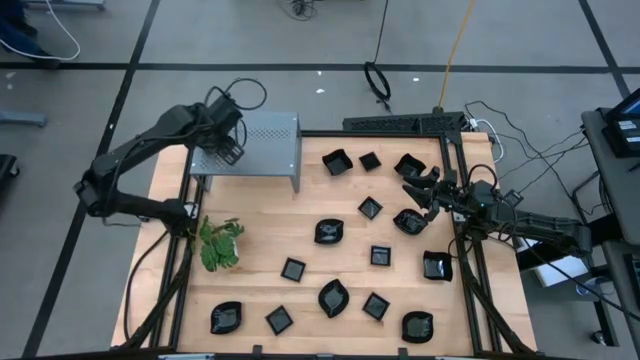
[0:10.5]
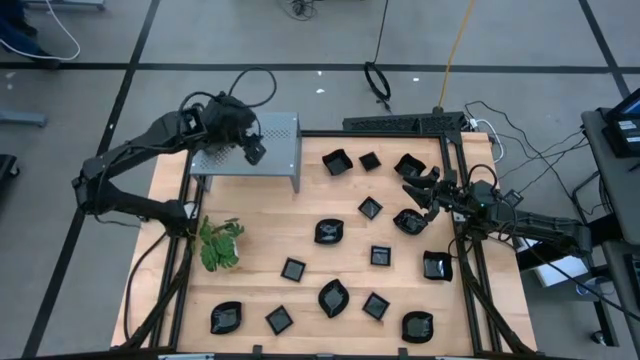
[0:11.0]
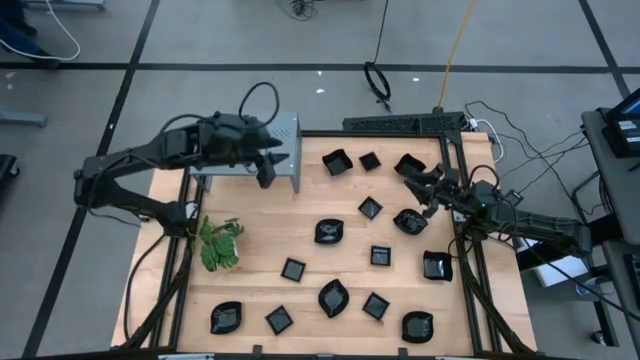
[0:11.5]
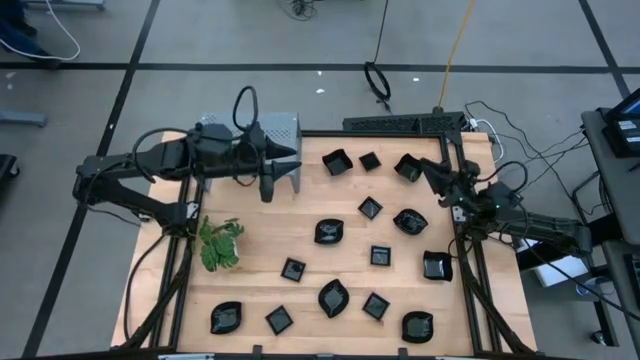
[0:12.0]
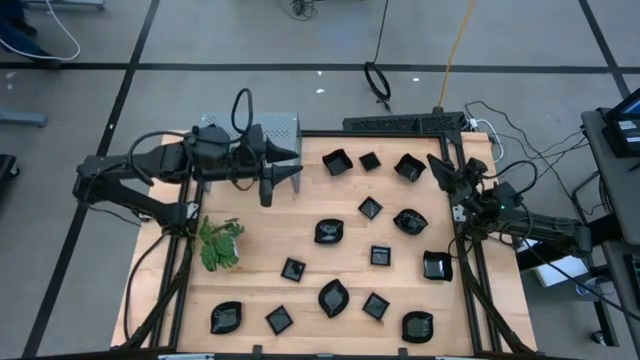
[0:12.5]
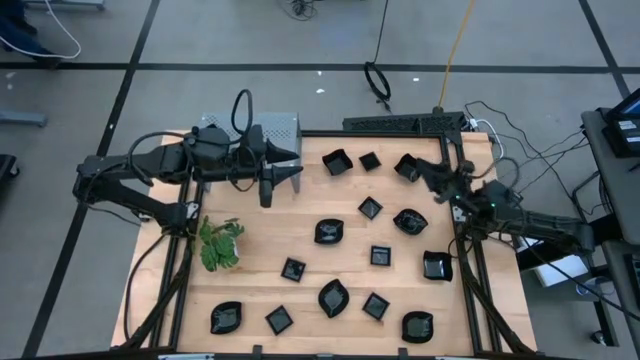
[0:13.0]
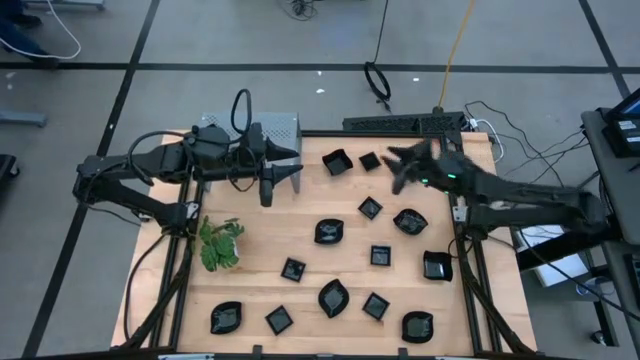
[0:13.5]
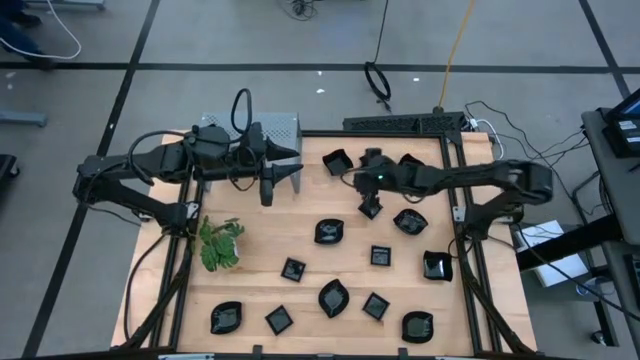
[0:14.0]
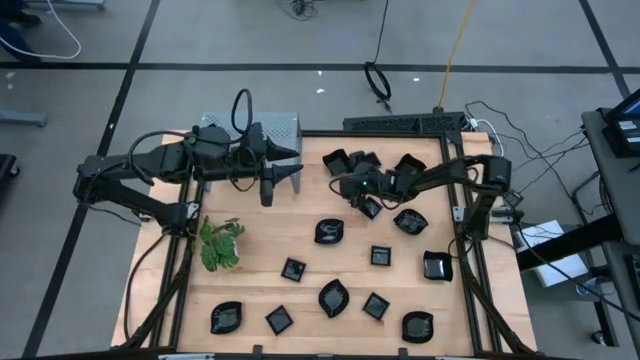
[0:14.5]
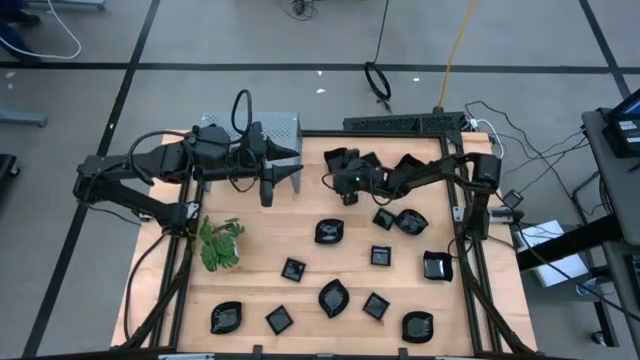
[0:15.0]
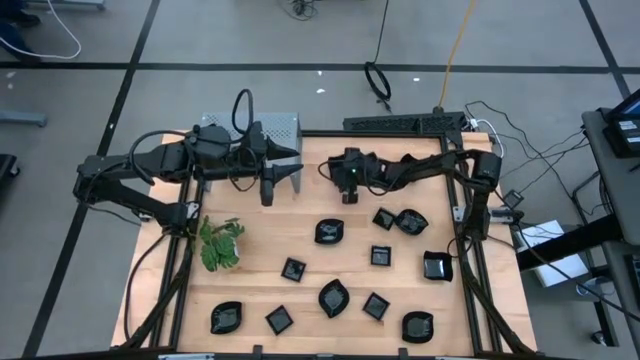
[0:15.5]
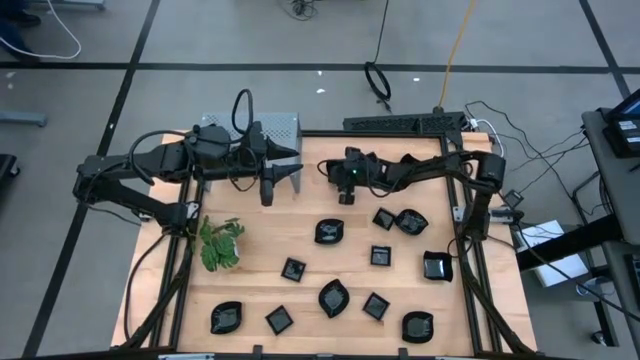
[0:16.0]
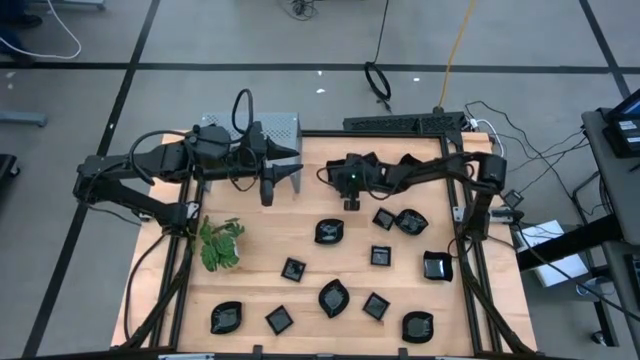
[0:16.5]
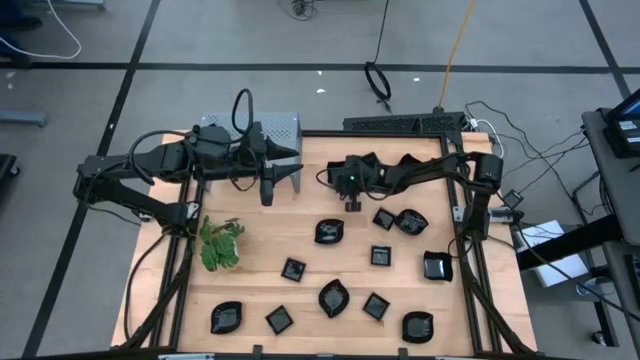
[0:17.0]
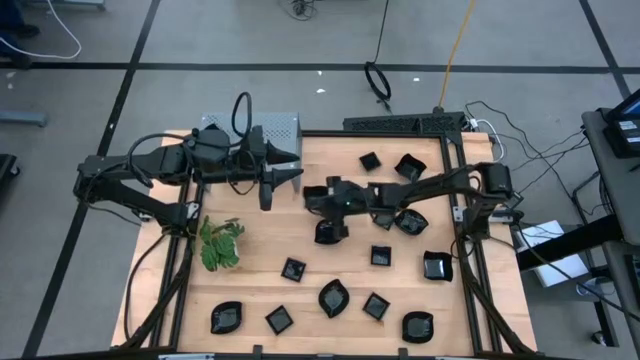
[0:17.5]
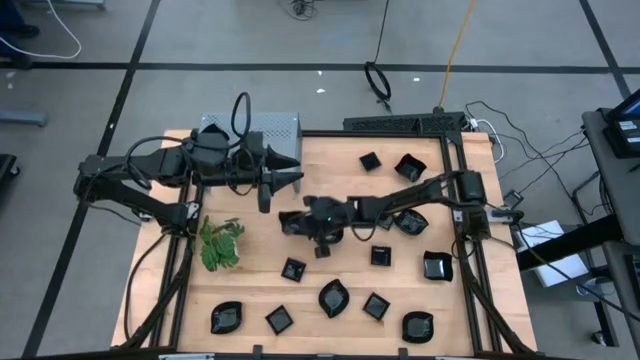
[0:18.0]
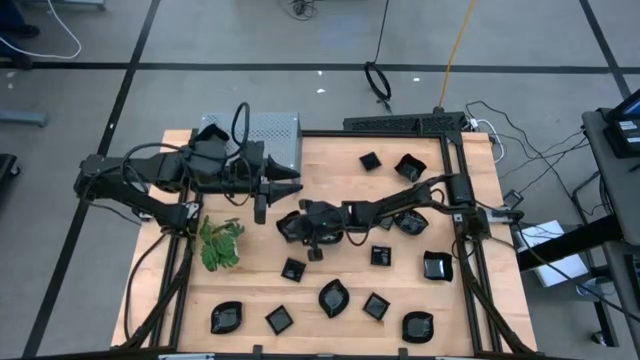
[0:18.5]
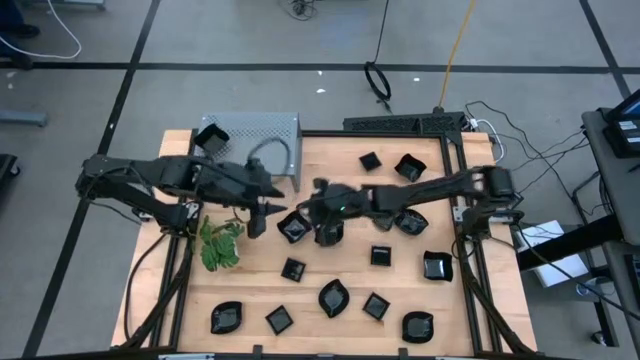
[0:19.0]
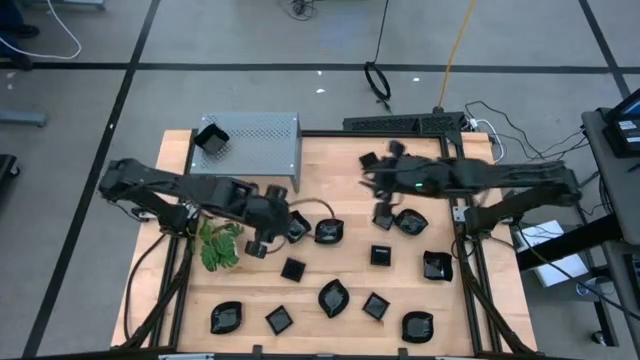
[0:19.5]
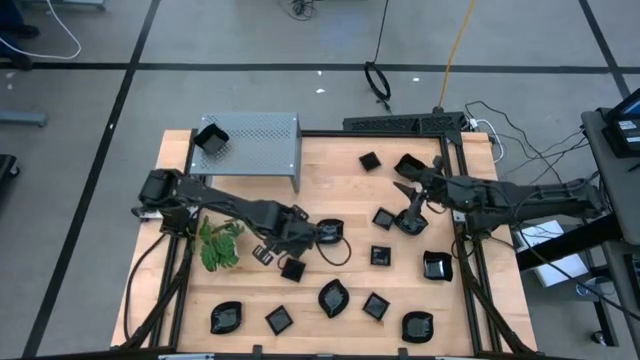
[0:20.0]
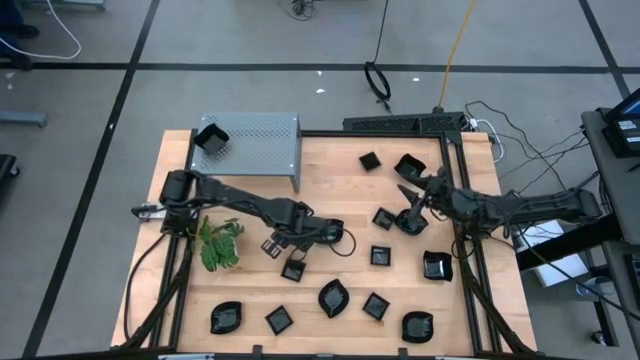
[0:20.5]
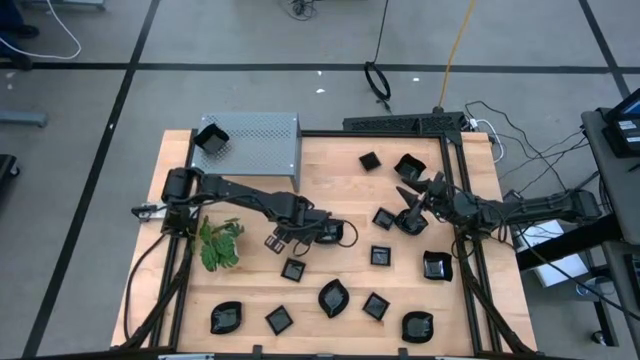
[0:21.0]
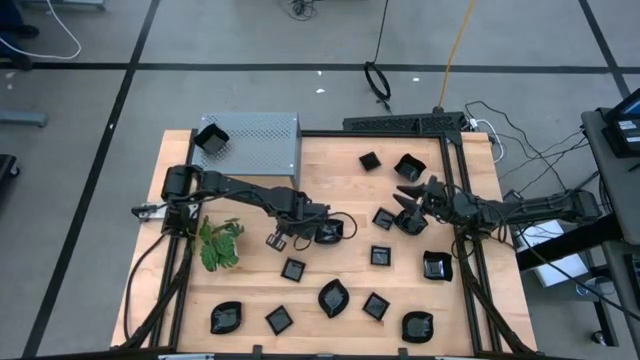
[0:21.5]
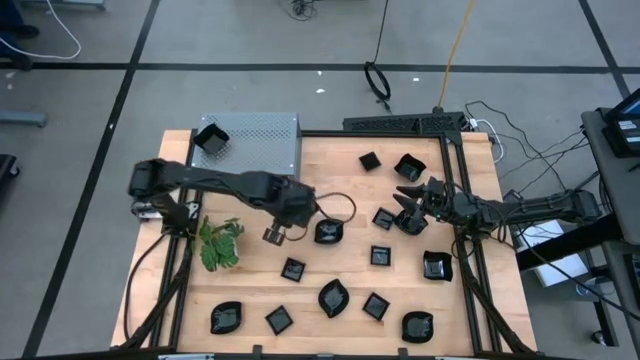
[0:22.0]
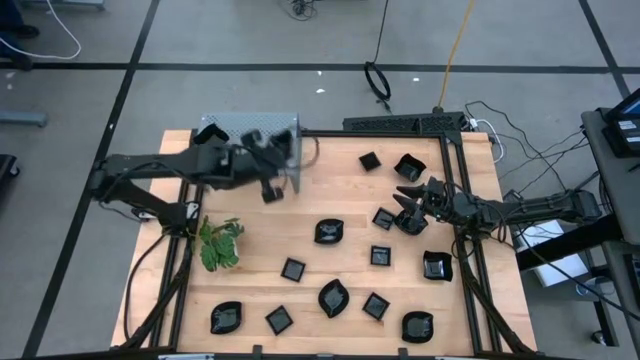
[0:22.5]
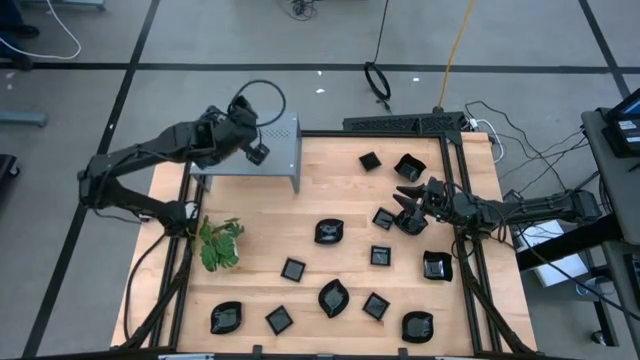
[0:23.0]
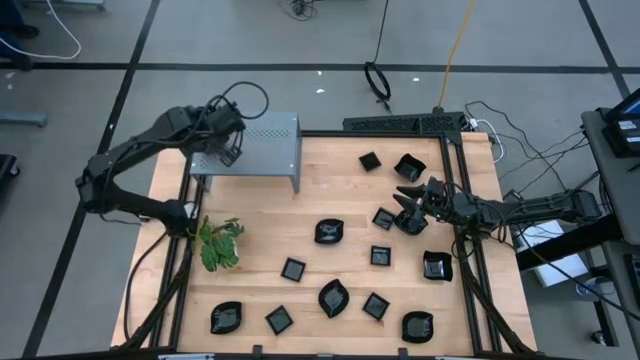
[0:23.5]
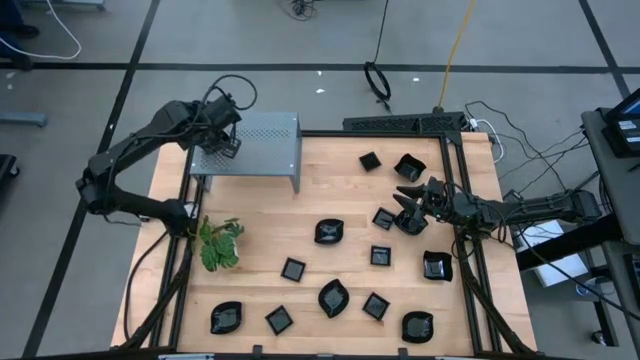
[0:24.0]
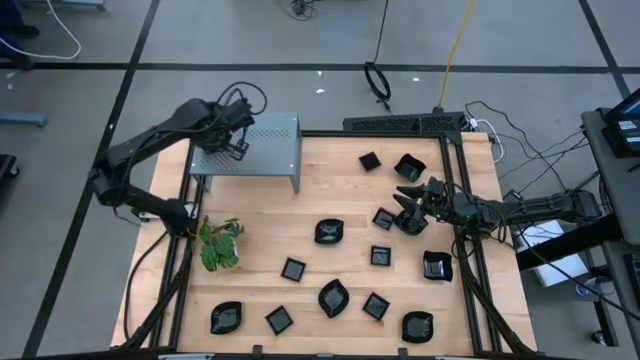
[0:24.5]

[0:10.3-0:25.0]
Task: Pick & Place Mini shaped plates
Stack the distorted square plate on top of the distorted square plate on the shelf

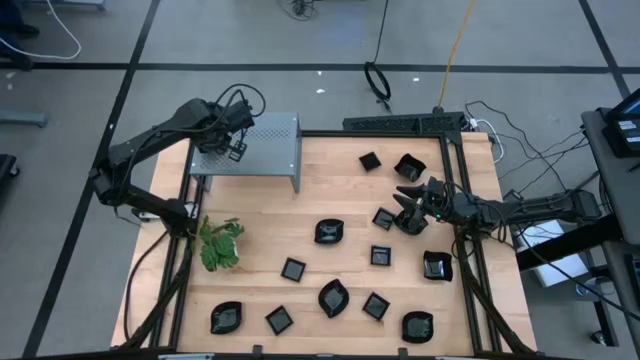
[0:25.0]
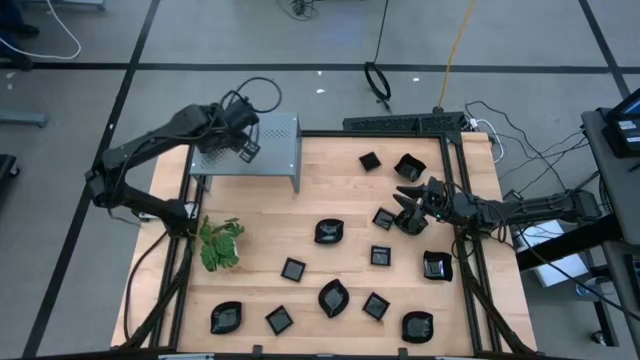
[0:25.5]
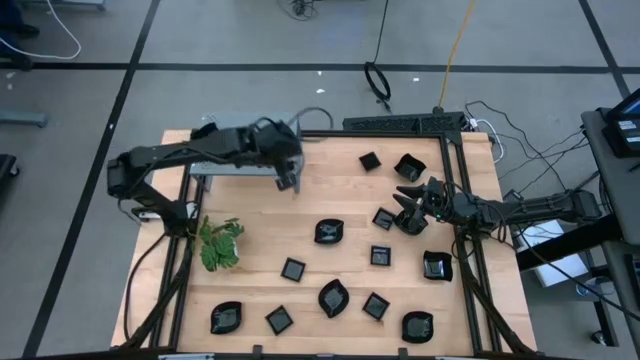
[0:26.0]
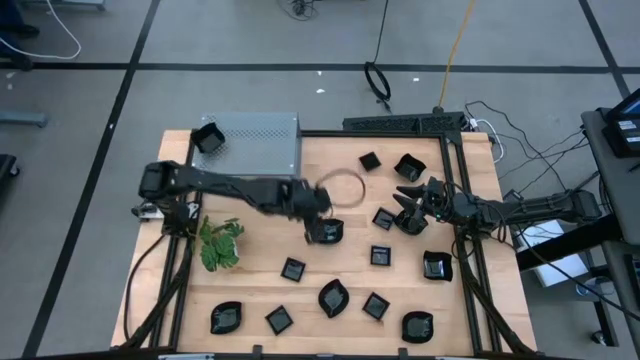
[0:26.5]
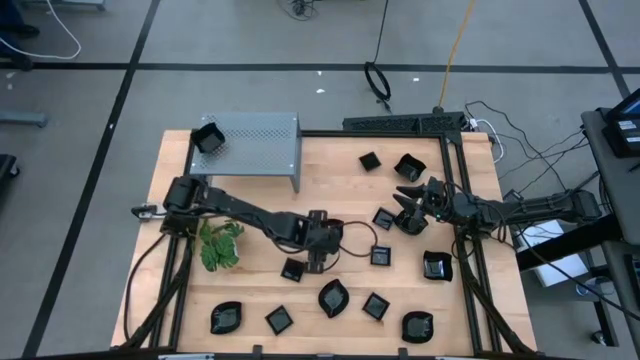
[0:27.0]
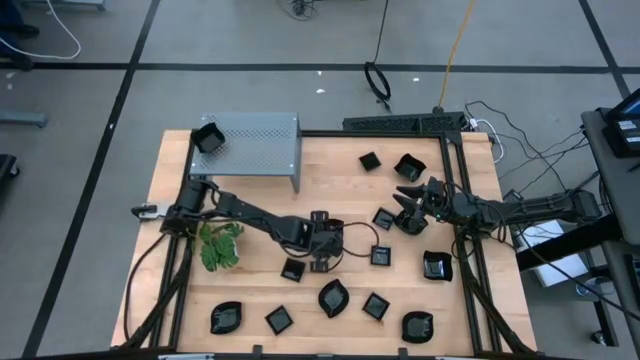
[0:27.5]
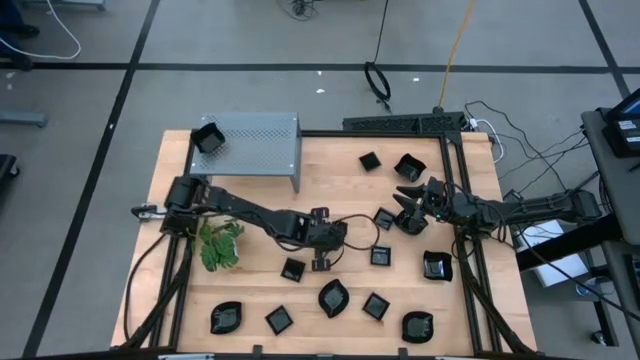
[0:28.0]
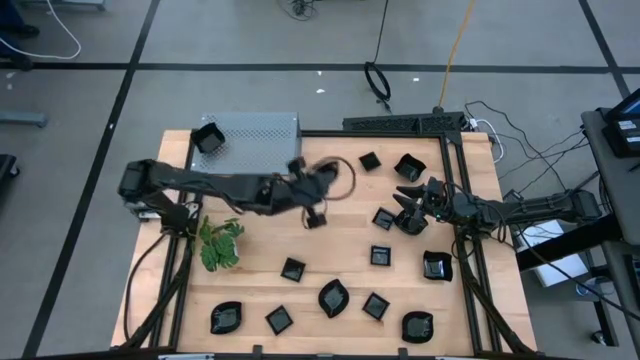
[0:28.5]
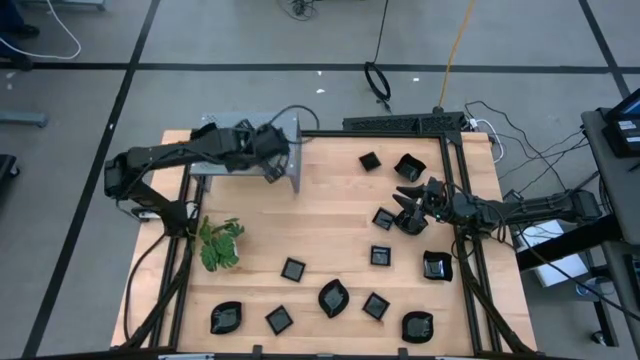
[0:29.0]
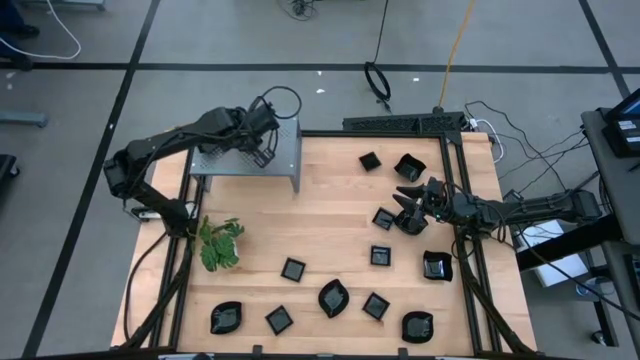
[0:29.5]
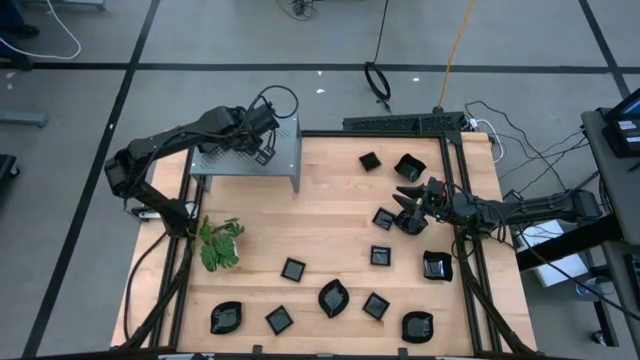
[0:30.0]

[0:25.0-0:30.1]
Put the leaf shaped plate on the shelf

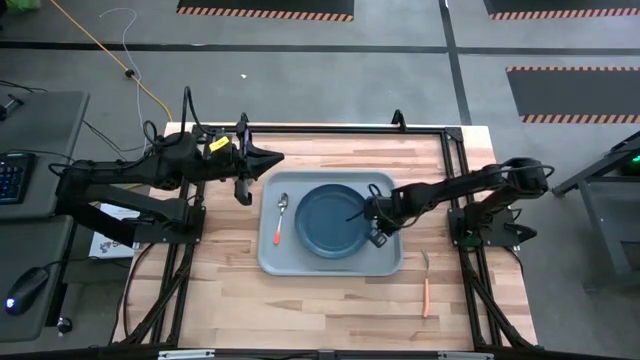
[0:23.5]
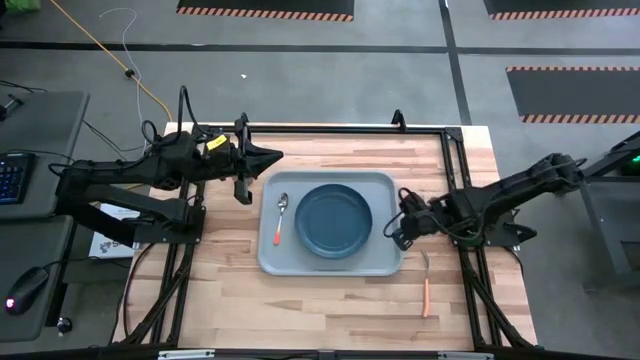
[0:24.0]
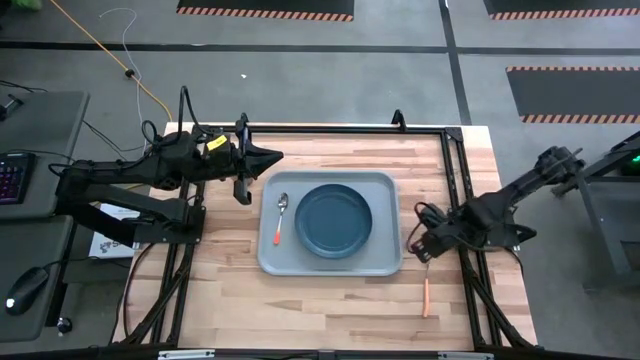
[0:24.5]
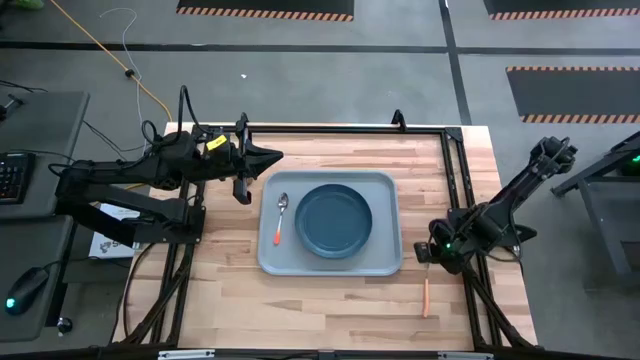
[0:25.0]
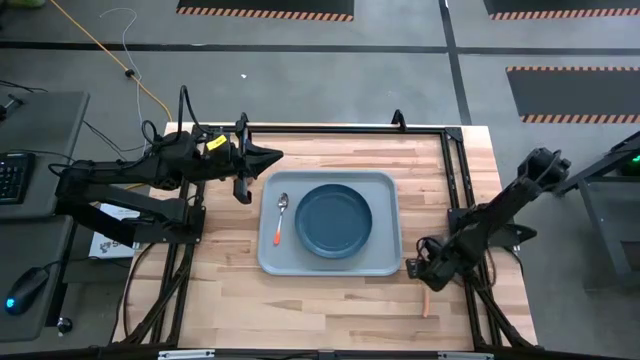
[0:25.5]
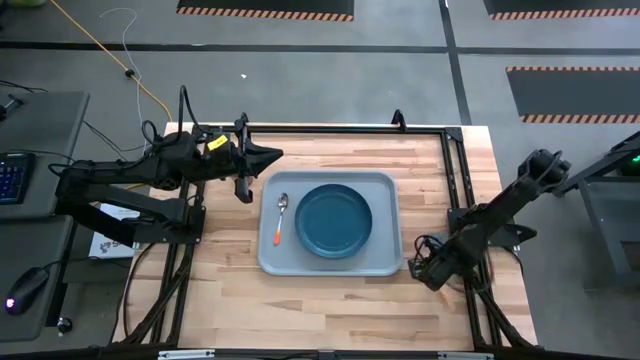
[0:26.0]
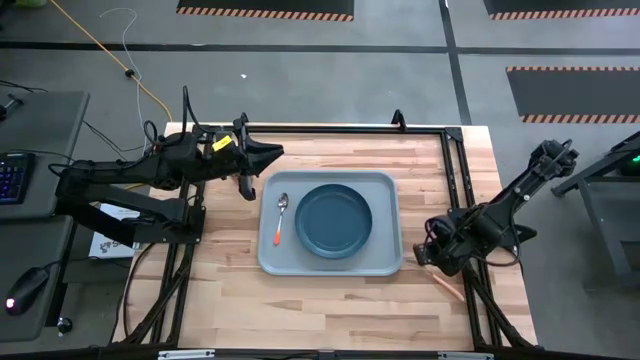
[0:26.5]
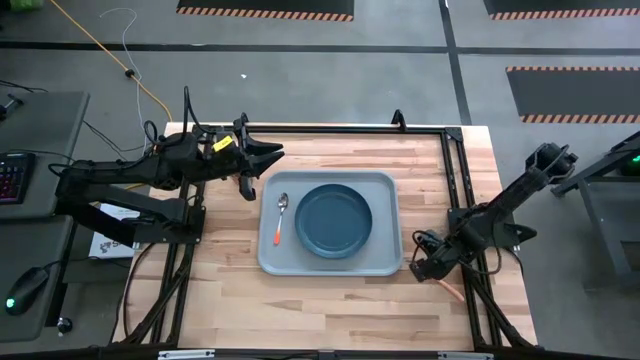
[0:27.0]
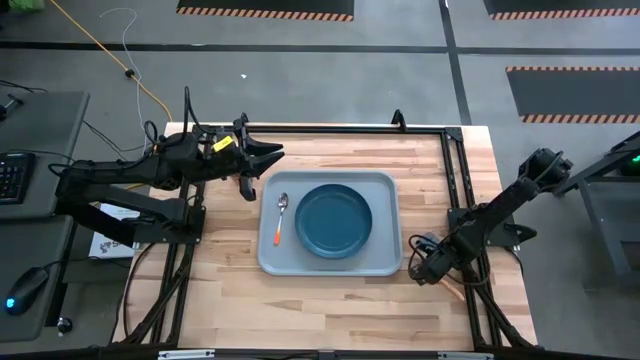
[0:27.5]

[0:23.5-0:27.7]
Task: Pick and place plate/cup/fork/spoon on tray
Put the orange fork on the gray tray
